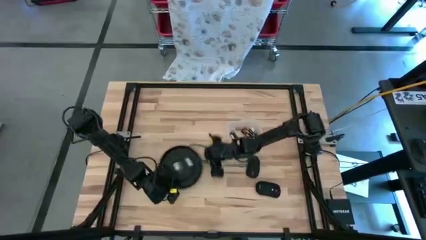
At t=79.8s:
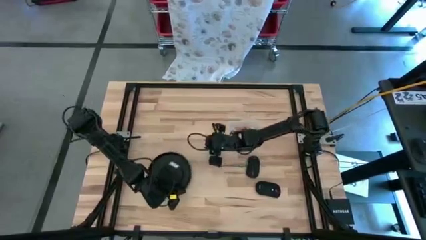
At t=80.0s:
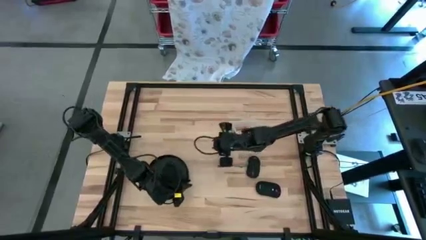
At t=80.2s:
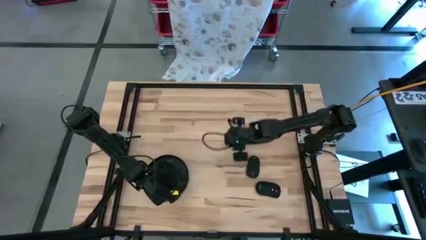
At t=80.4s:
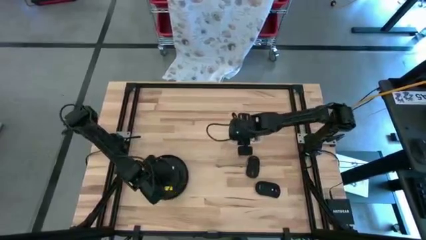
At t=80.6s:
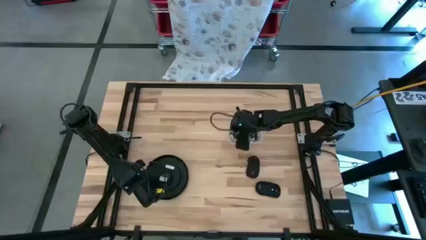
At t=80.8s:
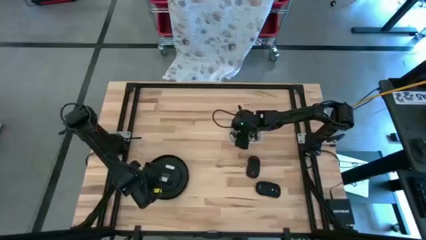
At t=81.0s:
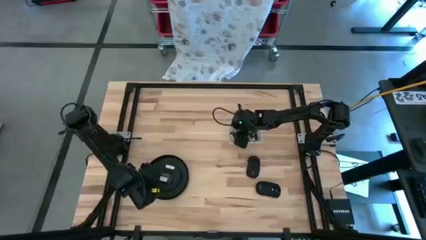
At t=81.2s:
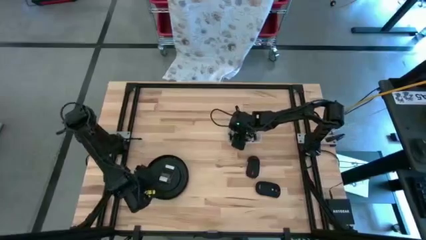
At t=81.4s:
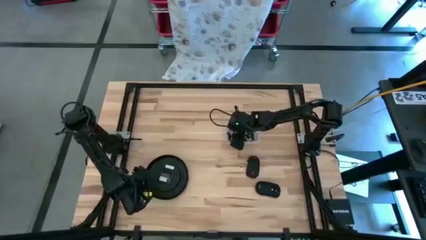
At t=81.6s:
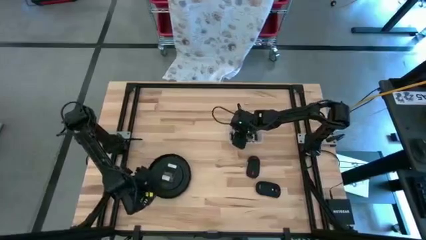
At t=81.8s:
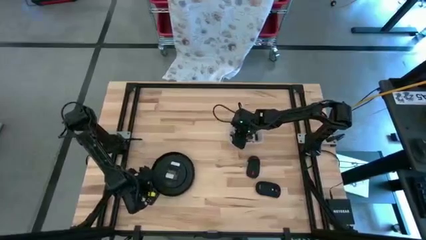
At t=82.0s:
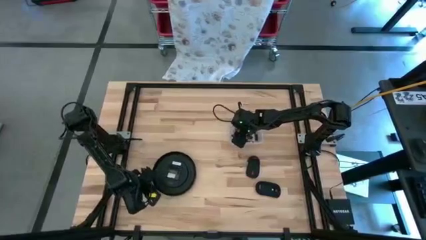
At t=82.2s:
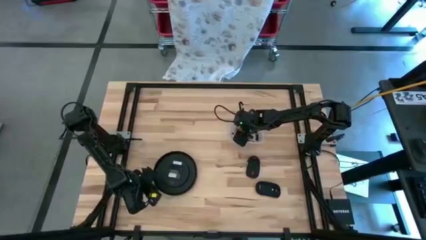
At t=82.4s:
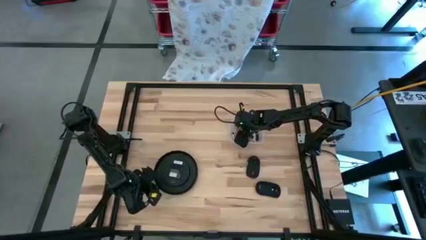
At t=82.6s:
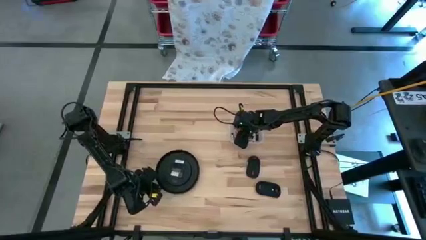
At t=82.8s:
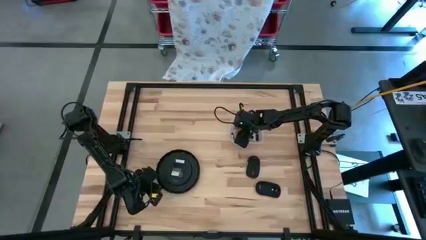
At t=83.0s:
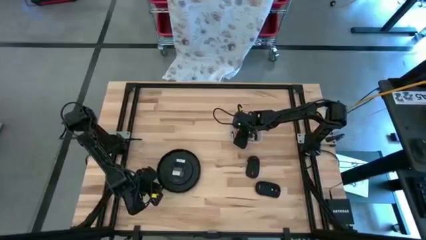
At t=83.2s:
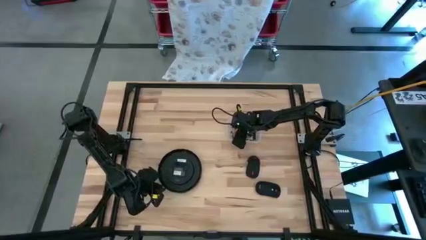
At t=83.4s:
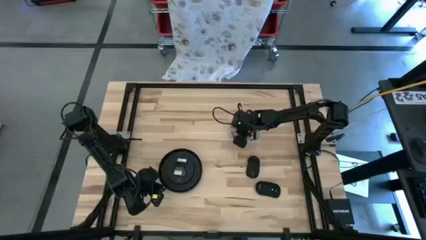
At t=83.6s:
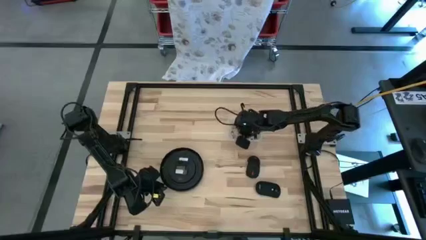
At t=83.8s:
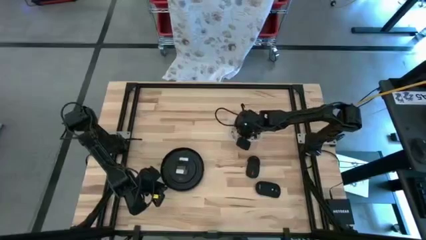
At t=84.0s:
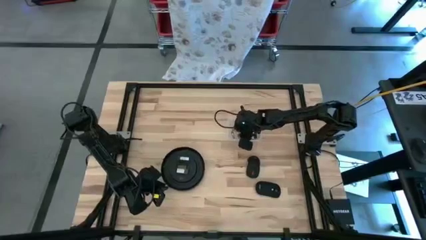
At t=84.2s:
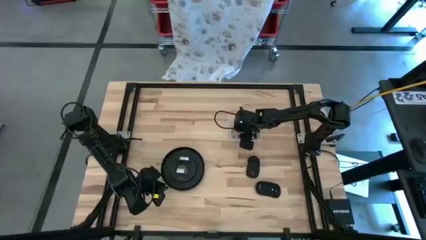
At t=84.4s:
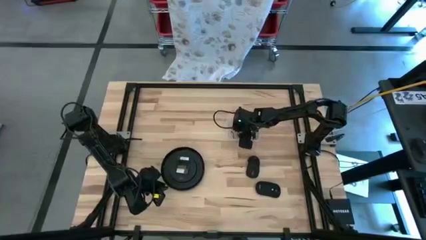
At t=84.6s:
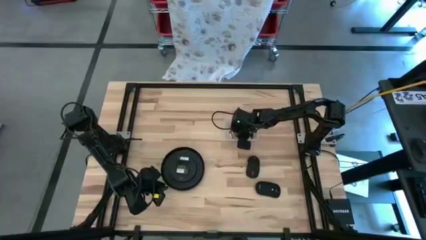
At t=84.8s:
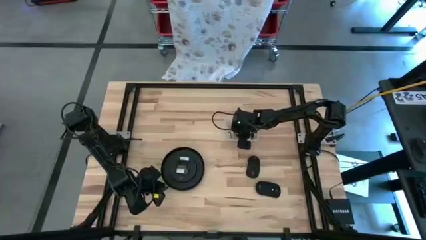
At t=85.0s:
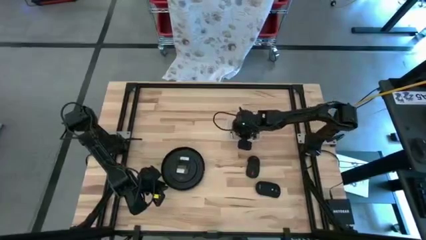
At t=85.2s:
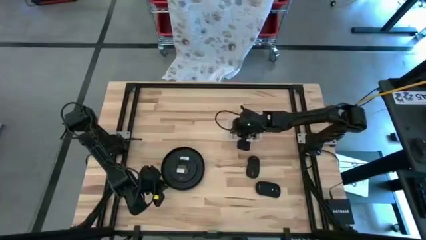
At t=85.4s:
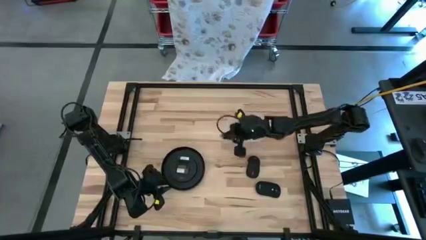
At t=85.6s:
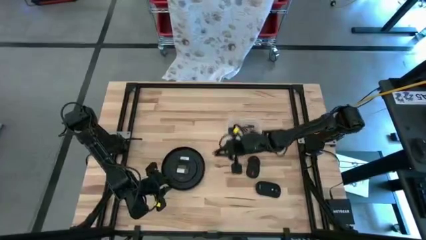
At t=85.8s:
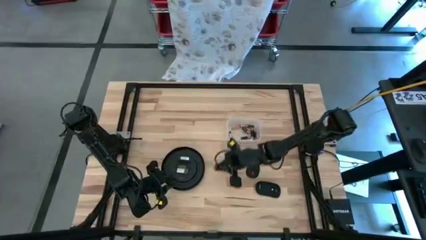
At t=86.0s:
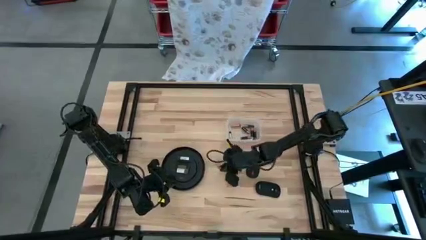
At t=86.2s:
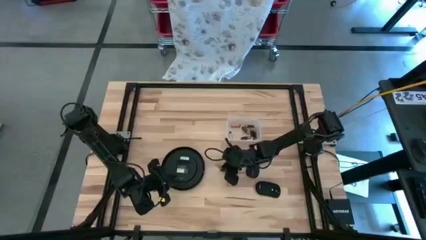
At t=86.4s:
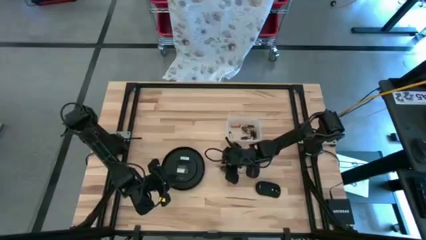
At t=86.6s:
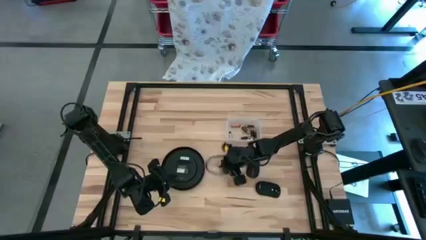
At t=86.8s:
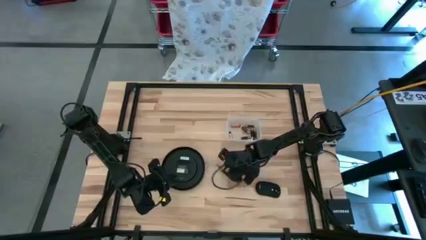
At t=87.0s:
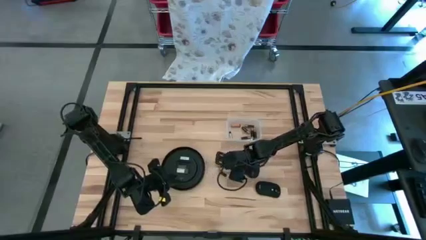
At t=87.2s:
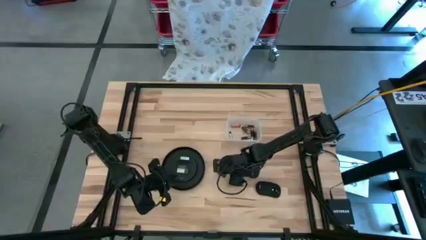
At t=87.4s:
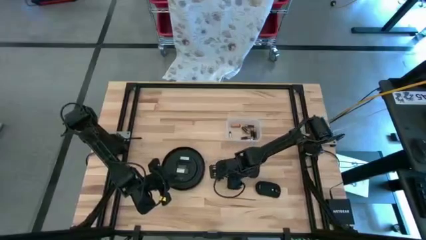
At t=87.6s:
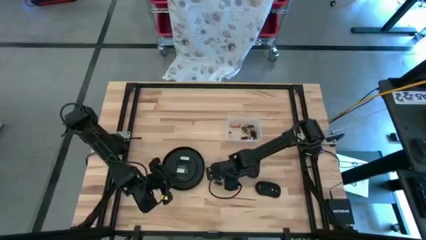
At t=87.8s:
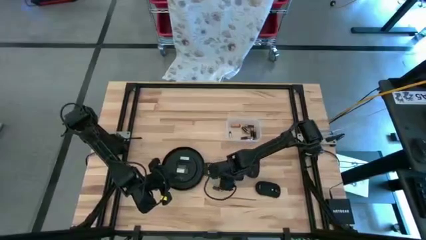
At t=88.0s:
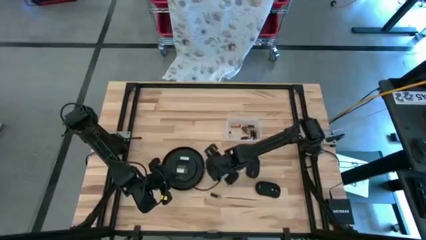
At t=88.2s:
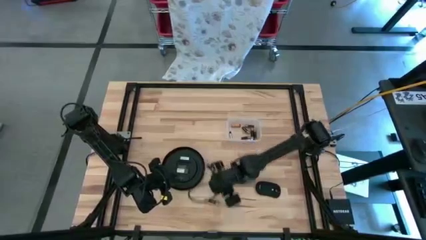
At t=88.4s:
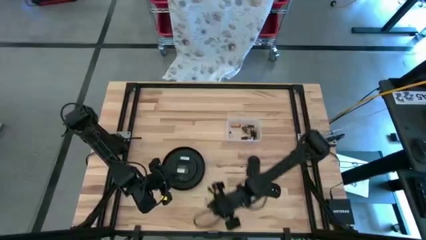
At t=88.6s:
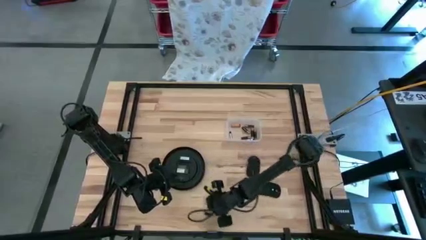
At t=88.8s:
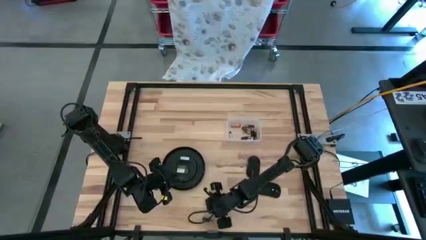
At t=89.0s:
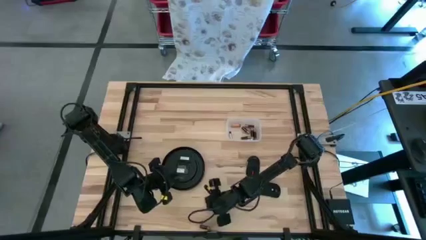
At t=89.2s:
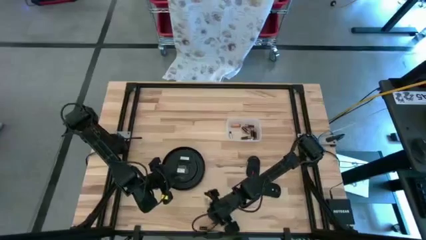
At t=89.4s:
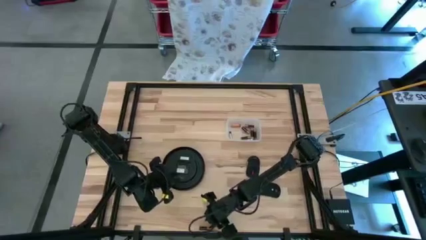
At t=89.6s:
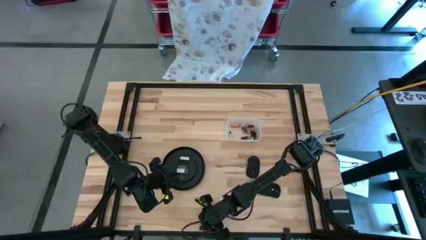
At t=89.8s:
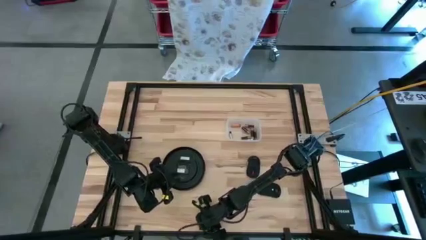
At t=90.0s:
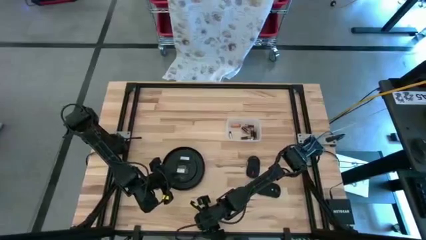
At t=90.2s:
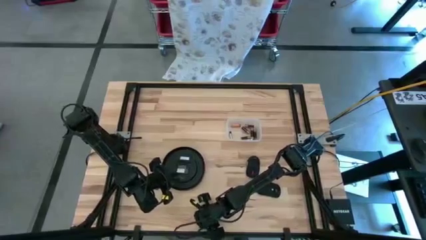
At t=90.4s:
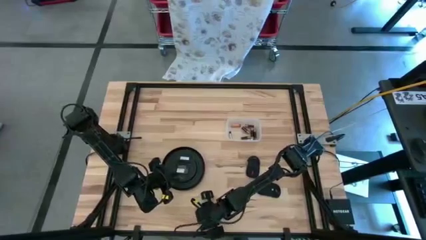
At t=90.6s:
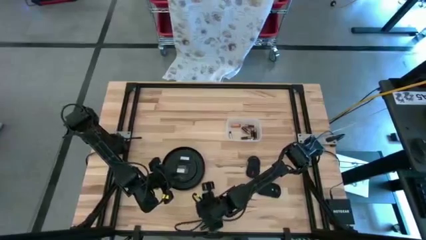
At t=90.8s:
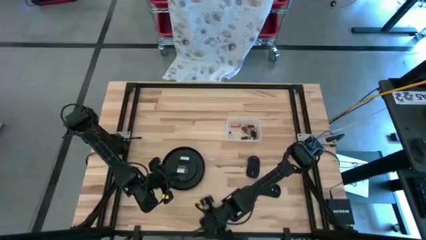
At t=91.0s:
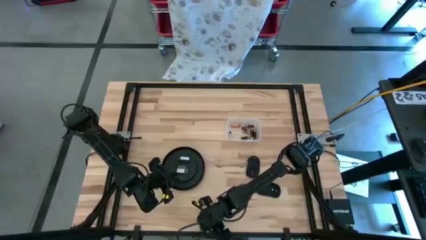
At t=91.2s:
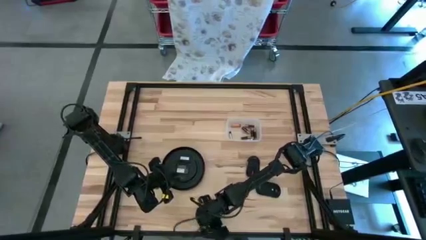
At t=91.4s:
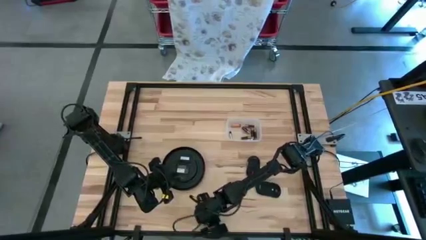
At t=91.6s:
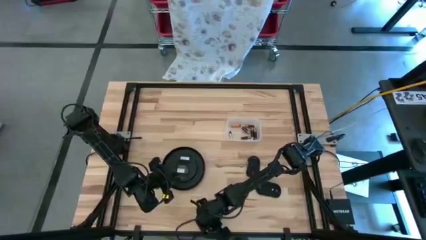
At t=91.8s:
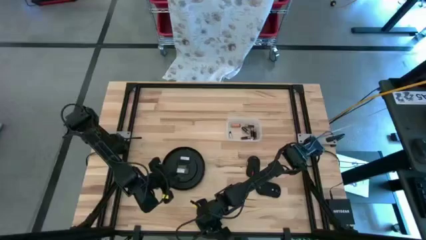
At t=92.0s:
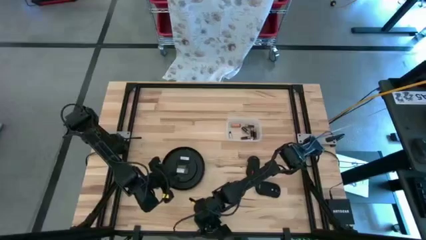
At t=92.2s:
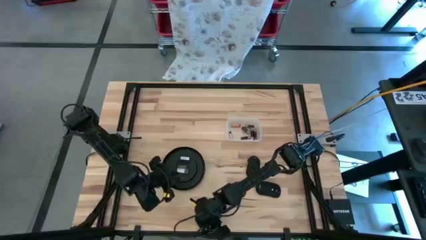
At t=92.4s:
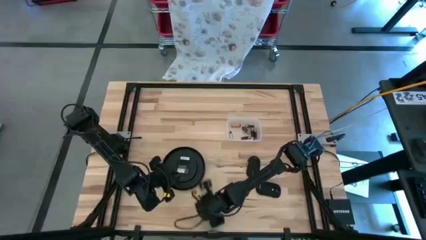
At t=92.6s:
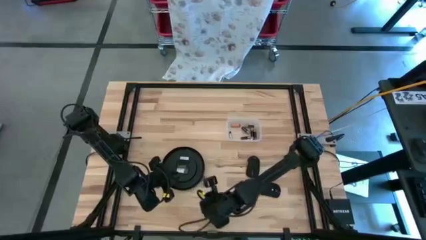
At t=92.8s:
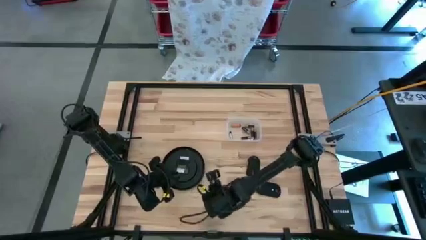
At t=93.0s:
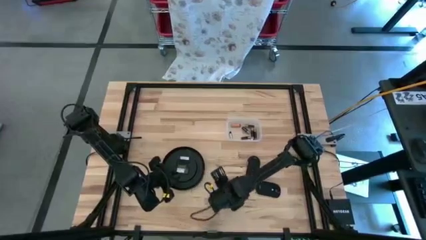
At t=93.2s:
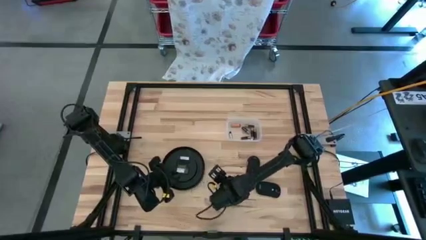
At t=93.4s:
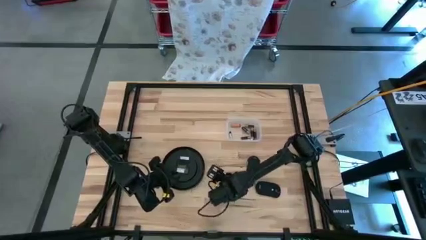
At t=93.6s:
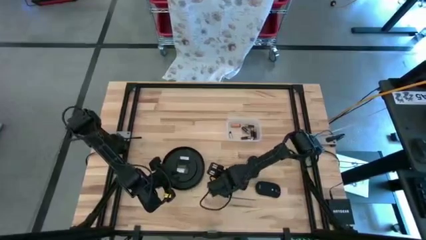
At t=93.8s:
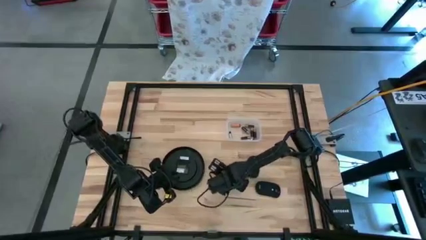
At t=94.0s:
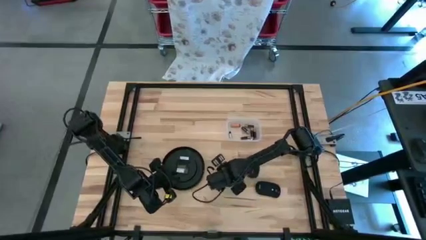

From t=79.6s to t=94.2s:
Task: Insert battery
Insert the black battery into the wall clock
